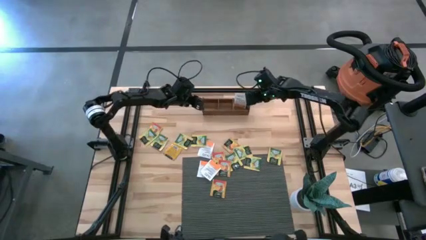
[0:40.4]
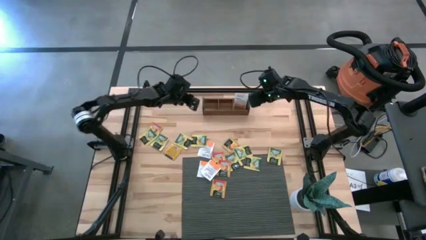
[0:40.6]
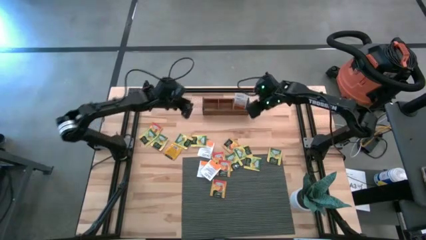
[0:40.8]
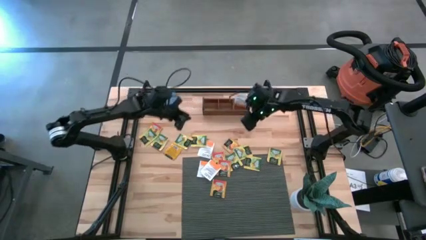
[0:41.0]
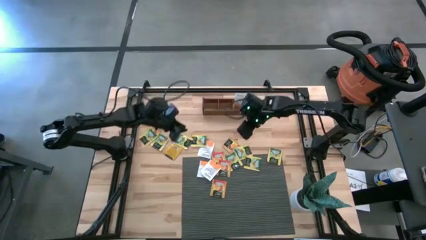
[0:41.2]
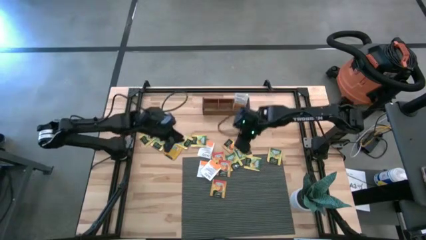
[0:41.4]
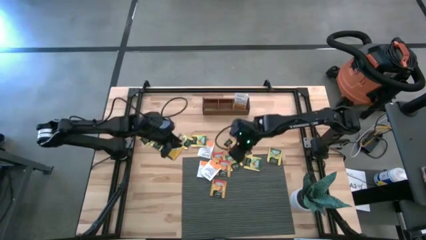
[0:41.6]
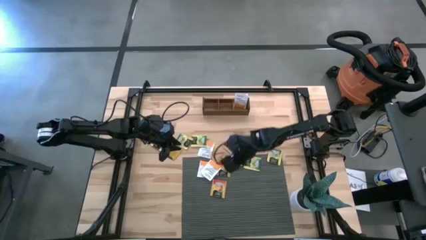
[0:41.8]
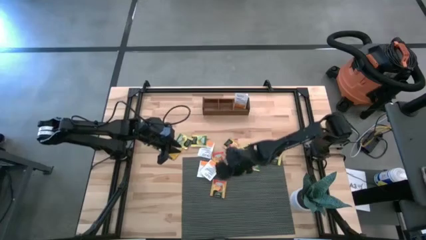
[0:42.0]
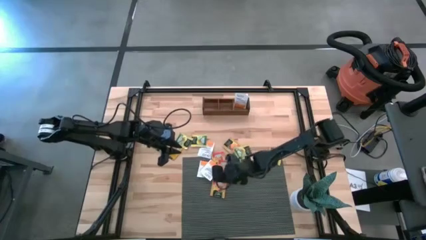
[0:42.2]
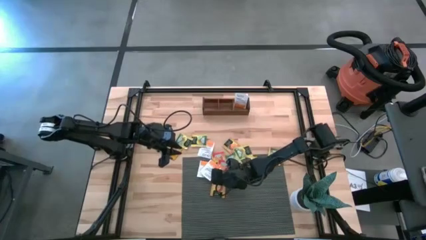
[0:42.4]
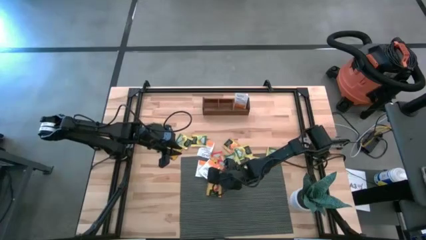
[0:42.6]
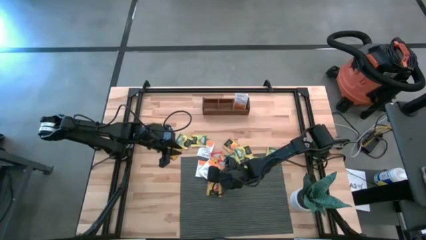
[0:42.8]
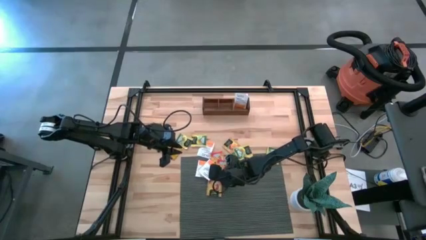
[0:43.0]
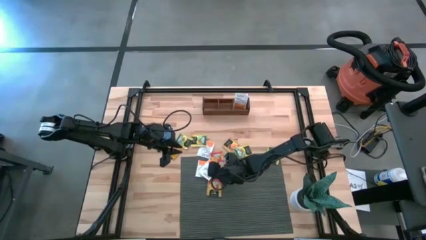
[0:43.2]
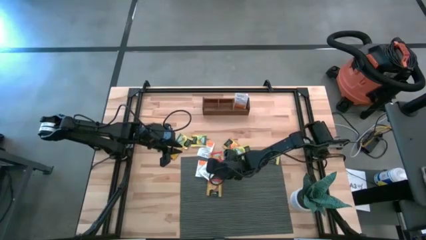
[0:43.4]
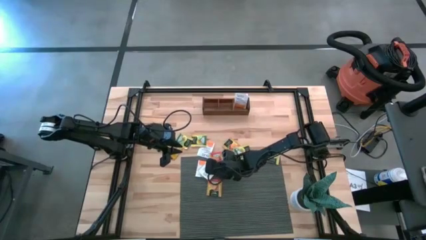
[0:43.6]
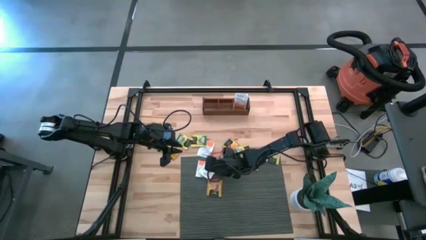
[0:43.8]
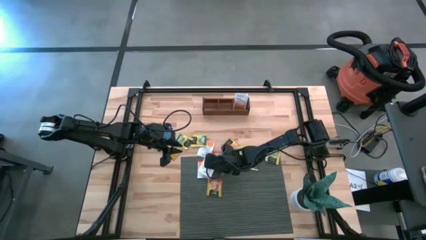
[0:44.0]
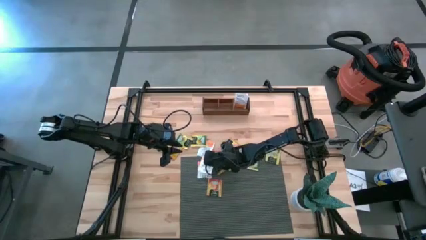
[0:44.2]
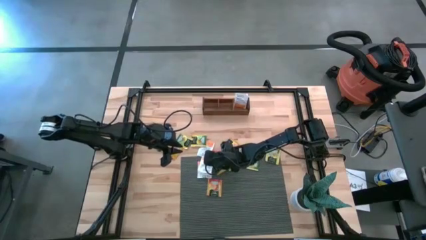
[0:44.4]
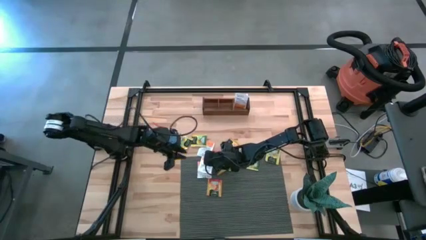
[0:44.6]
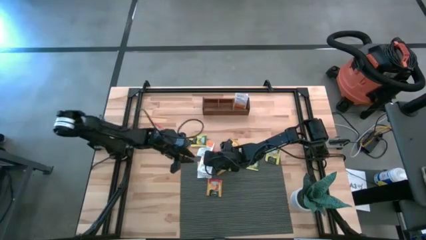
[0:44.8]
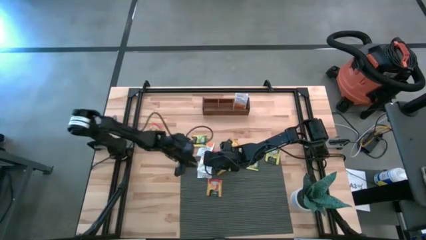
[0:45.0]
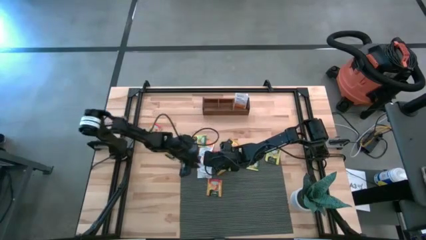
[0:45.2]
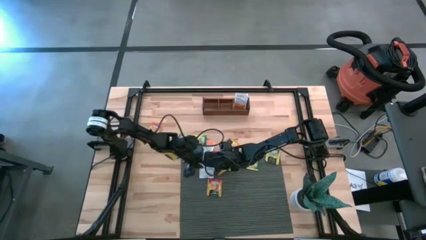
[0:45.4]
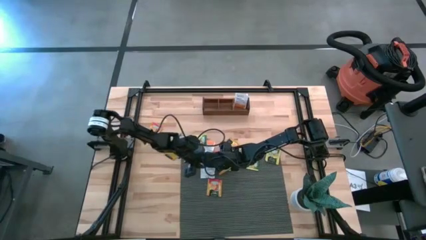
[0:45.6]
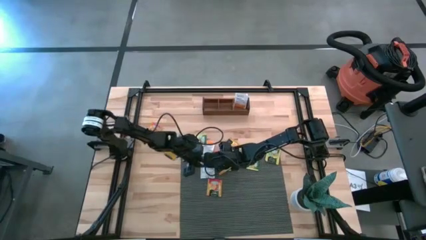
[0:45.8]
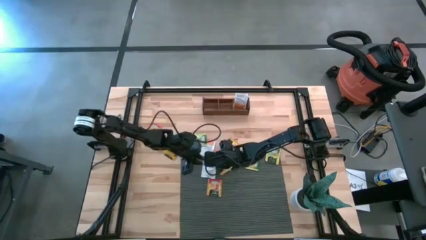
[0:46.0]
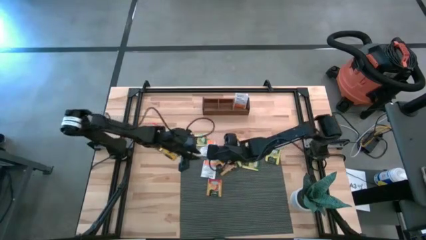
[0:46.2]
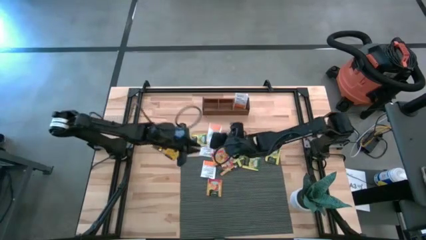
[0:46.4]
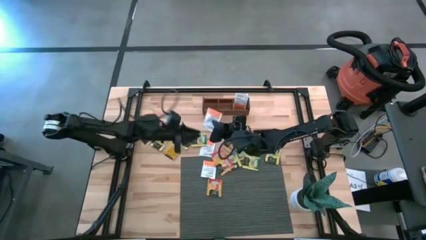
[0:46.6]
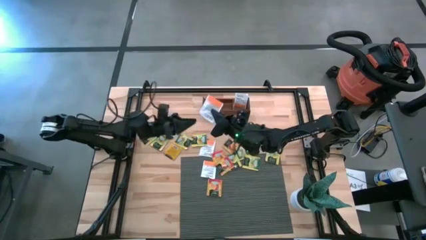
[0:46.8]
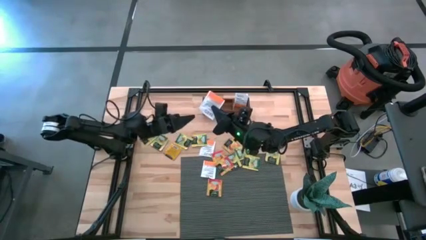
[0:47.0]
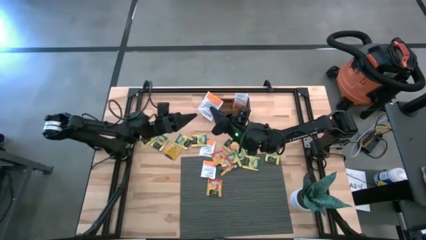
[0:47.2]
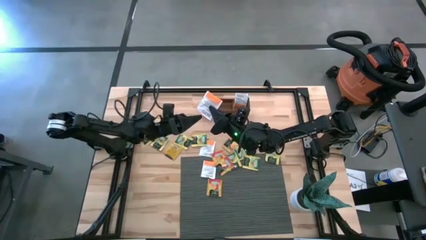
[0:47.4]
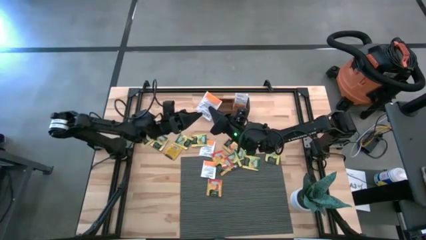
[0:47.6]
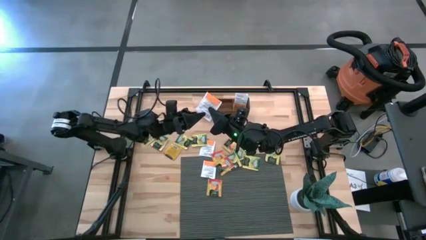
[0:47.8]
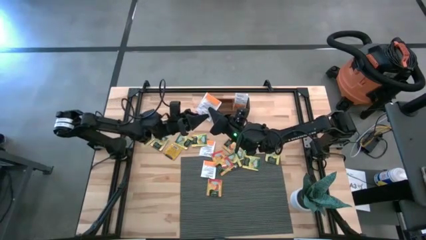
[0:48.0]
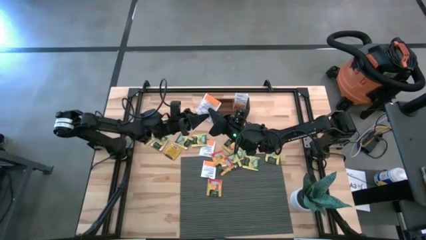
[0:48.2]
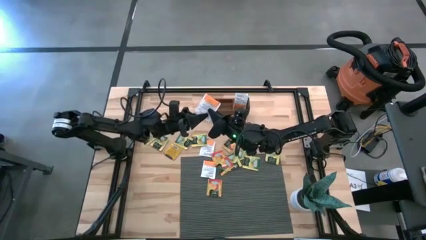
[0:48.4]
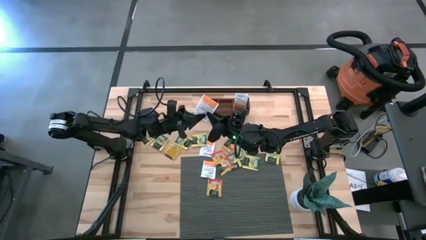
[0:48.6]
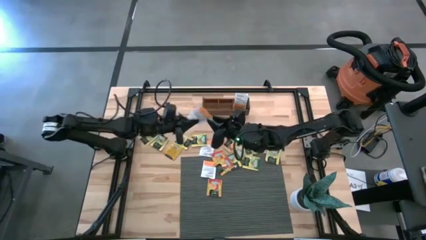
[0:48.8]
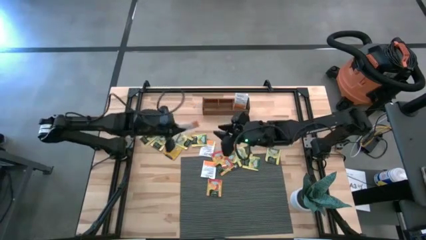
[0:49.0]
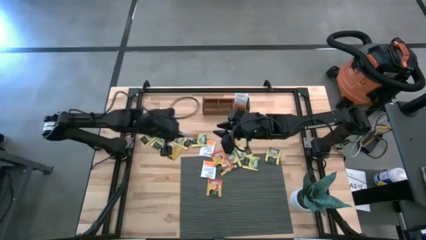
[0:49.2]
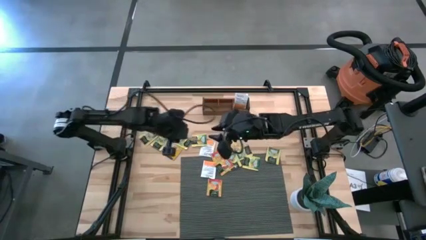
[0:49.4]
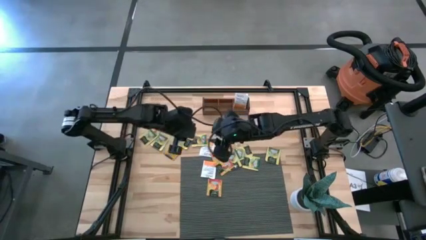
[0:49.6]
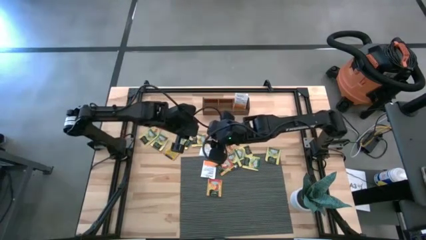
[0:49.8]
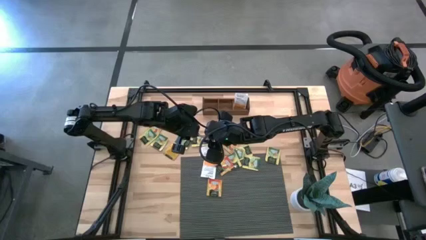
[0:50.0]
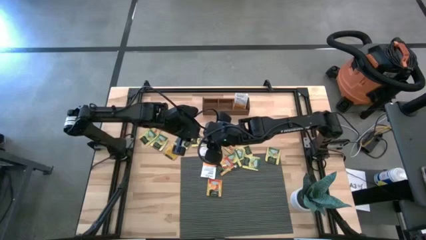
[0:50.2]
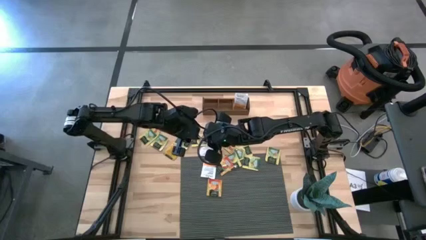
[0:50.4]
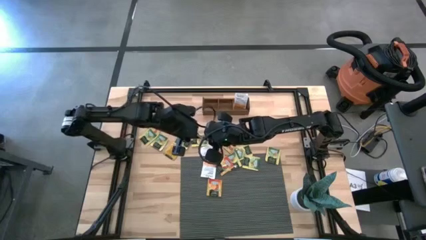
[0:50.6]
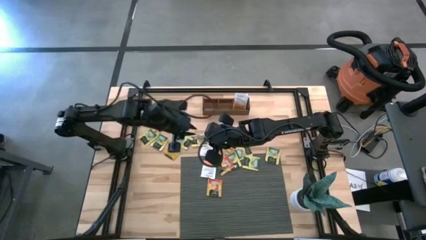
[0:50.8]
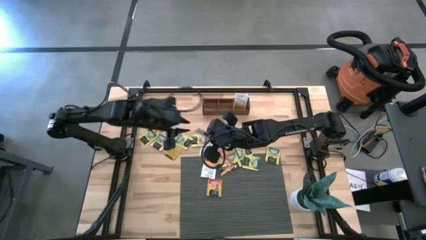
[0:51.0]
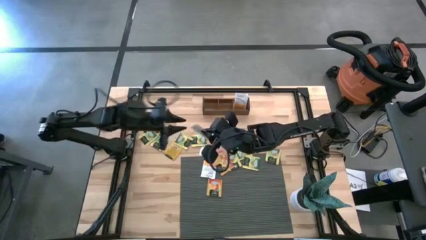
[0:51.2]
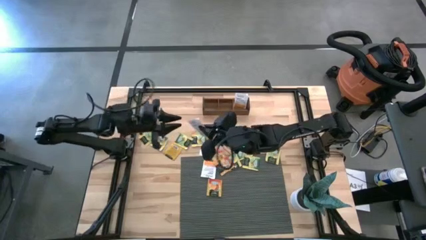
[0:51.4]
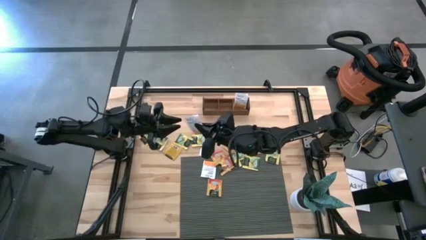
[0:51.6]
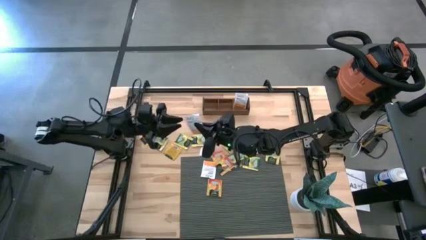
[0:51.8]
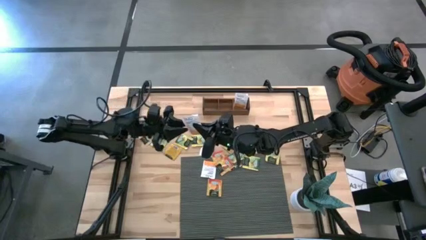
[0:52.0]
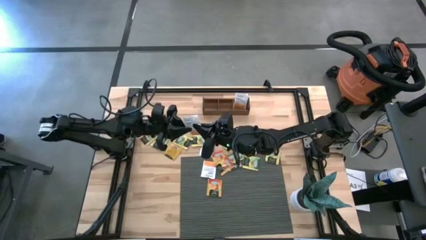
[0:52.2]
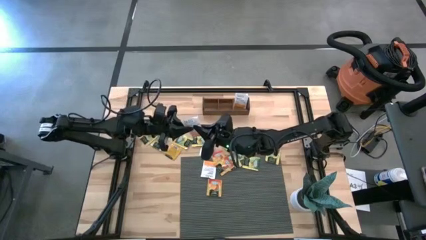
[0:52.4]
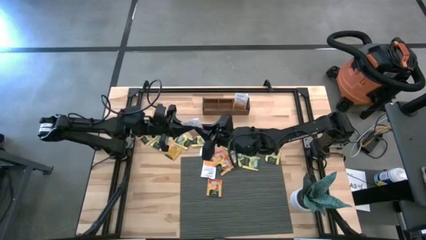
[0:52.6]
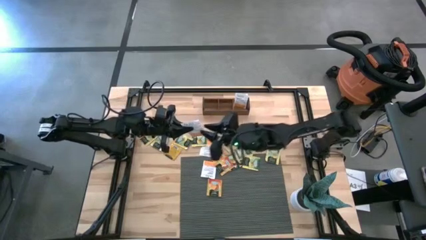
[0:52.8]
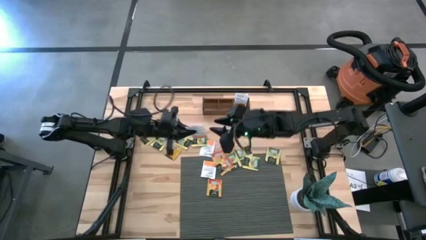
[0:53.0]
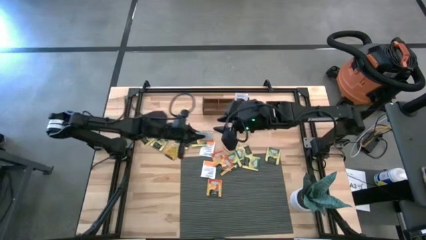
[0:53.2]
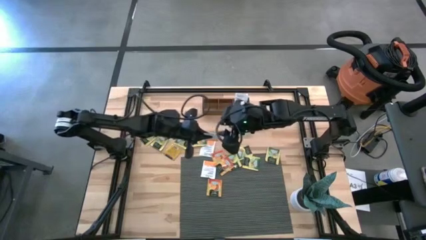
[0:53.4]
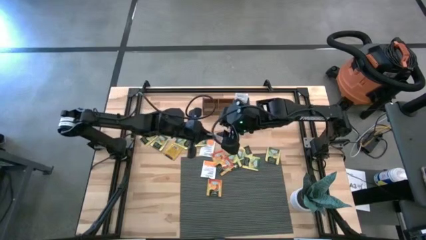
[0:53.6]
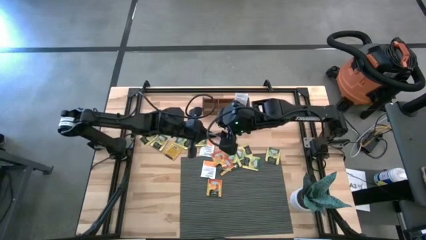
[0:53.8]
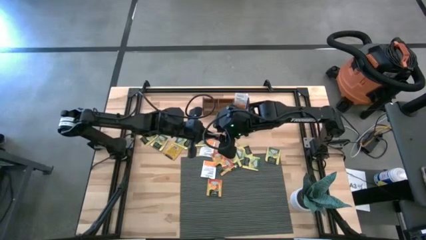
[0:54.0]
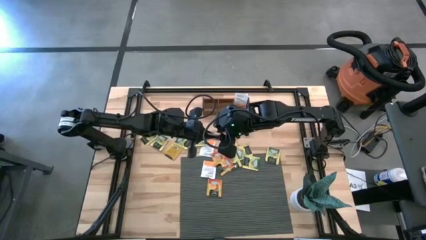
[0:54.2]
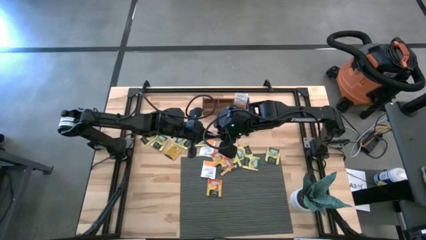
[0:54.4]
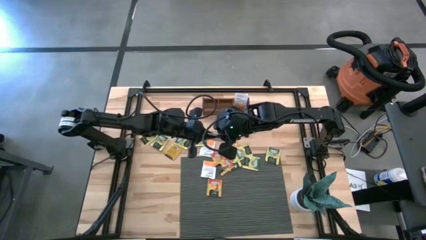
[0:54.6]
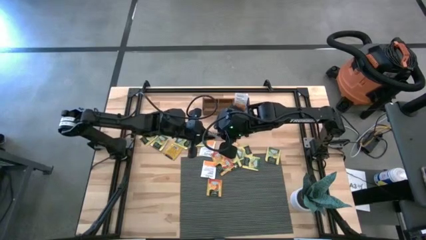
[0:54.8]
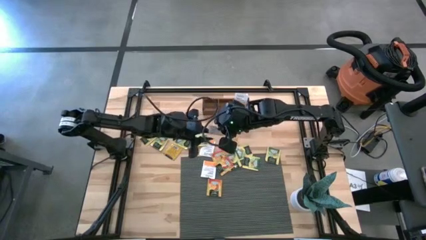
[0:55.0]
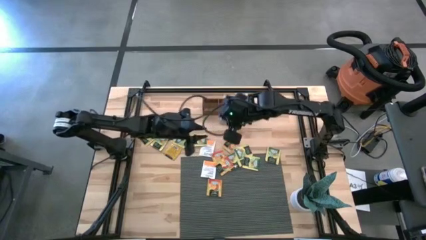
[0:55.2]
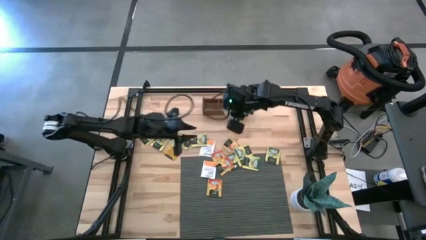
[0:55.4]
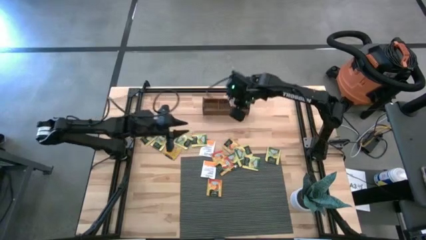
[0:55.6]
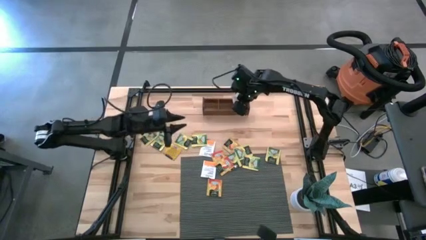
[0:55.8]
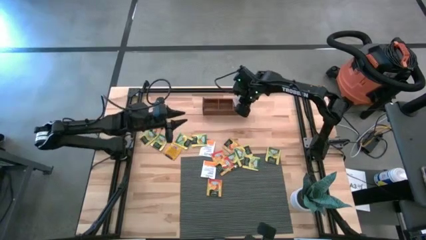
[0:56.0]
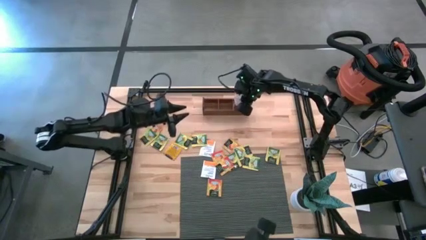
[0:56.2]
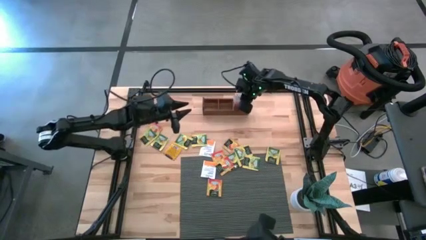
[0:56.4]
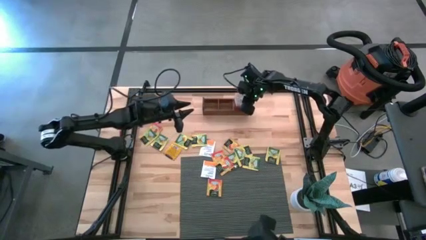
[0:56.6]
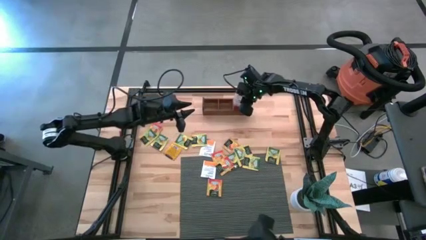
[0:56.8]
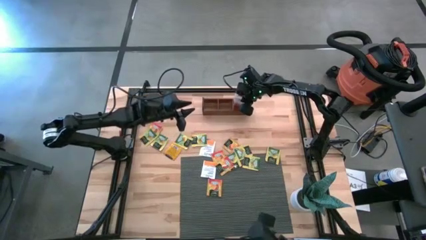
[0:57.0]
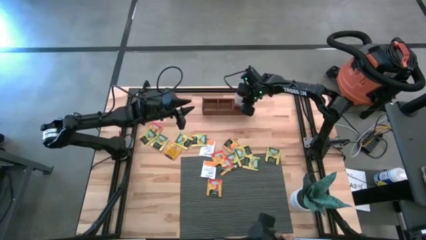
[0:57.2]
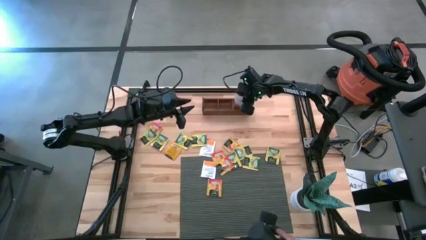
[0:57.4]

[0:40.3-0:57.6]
Task: Pick & Place Tea
Put the white tea bag into the right section of the wooden organizer
